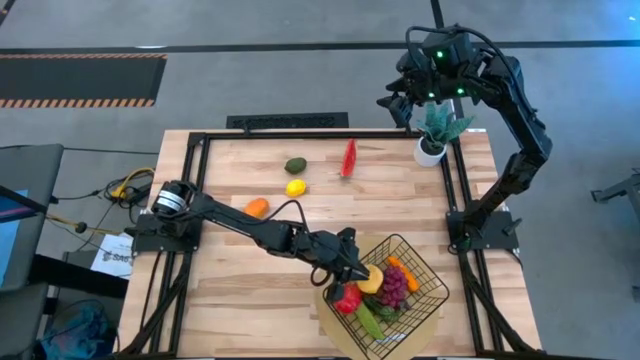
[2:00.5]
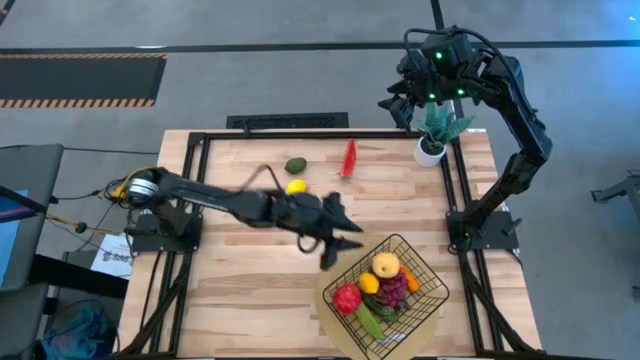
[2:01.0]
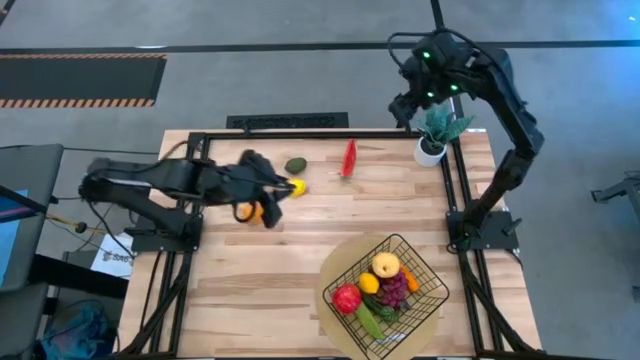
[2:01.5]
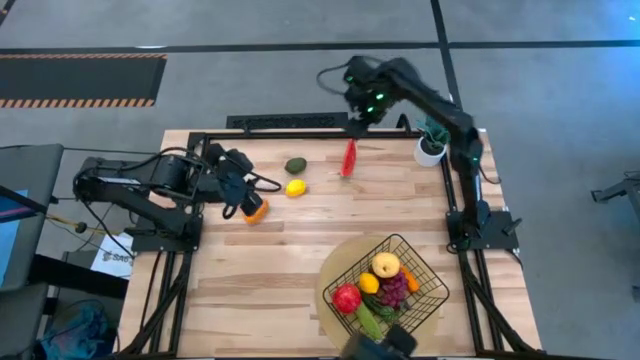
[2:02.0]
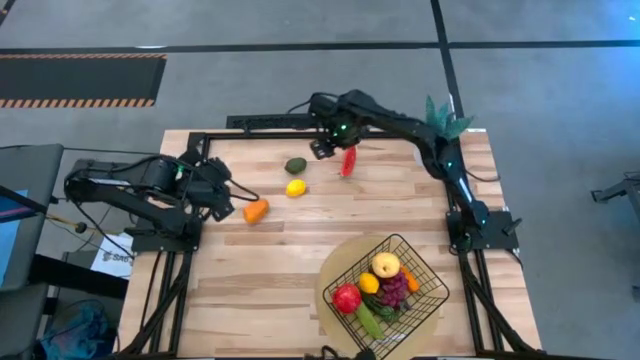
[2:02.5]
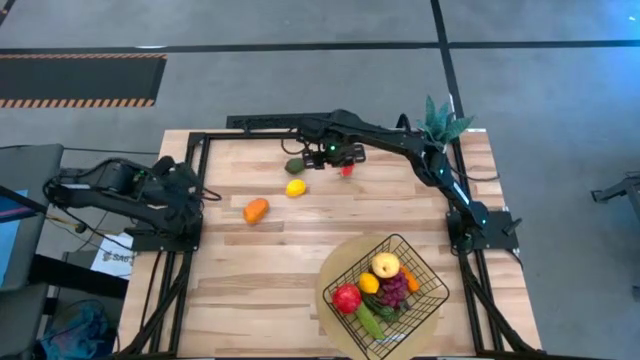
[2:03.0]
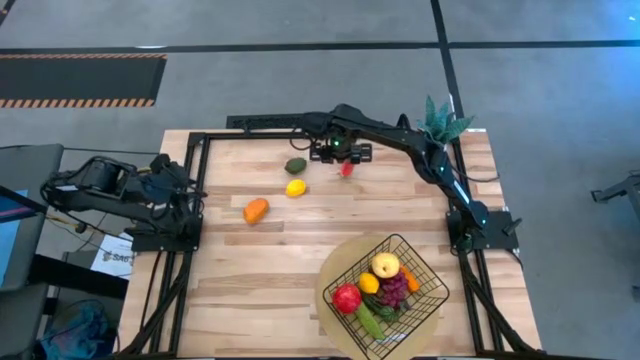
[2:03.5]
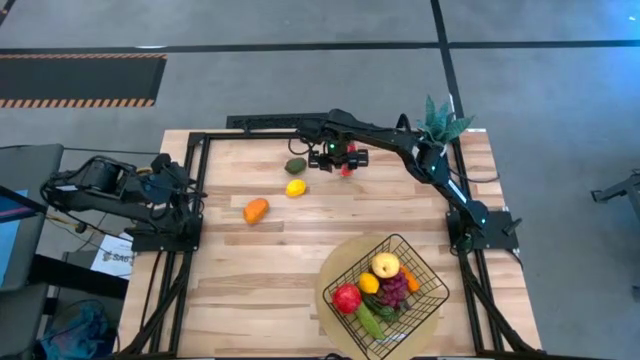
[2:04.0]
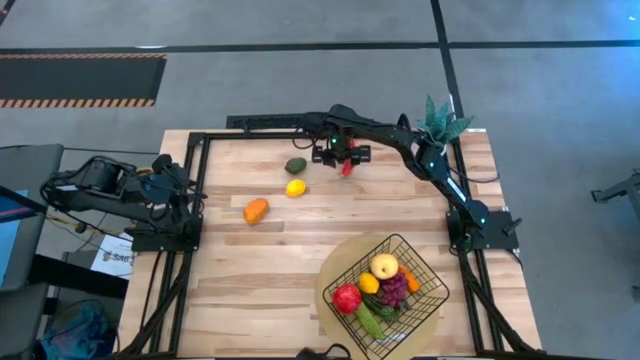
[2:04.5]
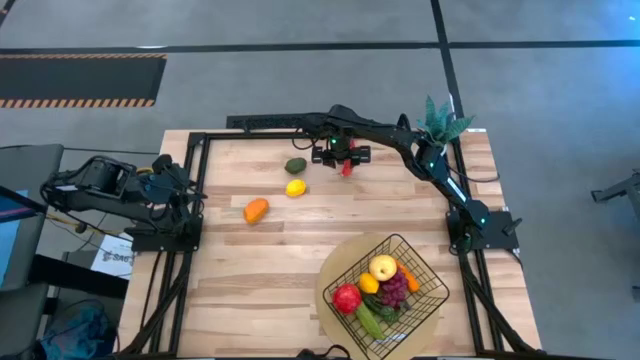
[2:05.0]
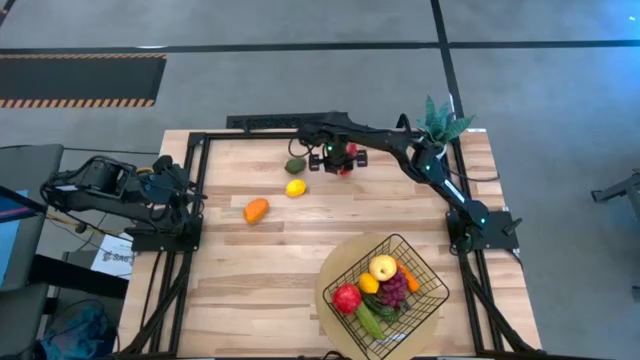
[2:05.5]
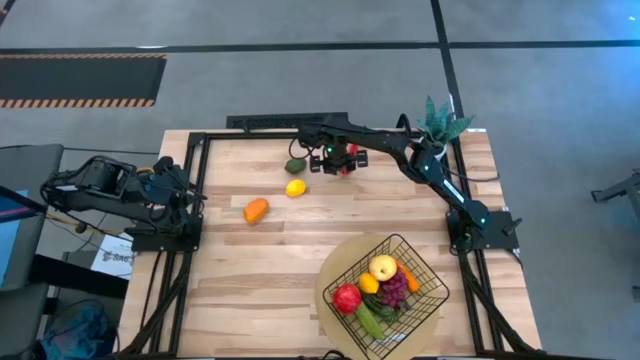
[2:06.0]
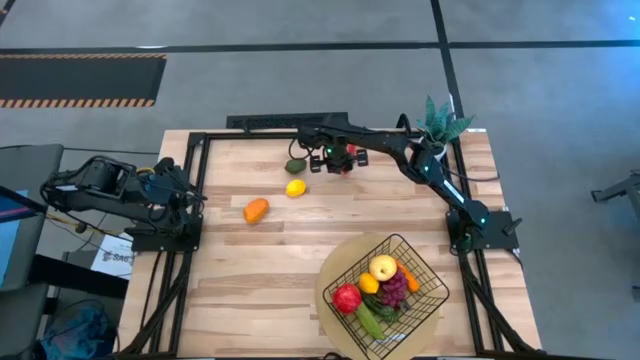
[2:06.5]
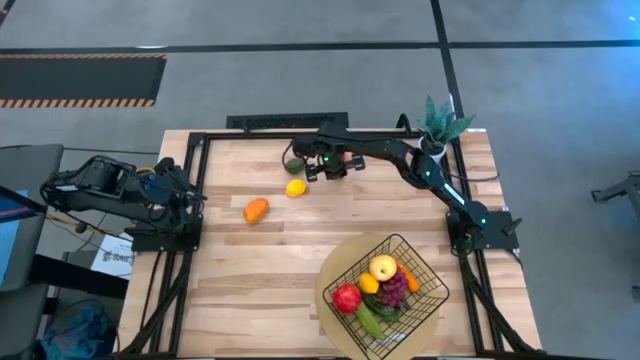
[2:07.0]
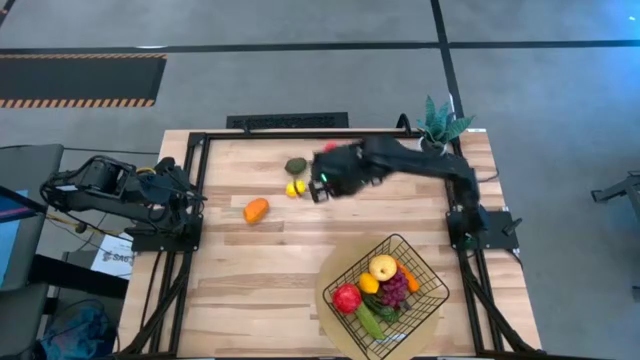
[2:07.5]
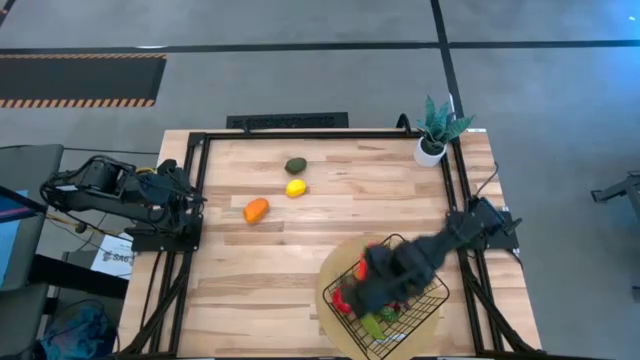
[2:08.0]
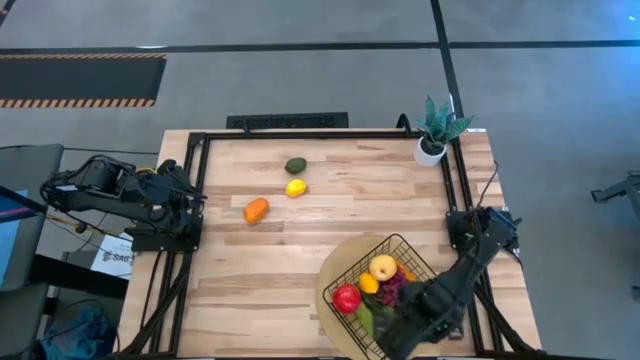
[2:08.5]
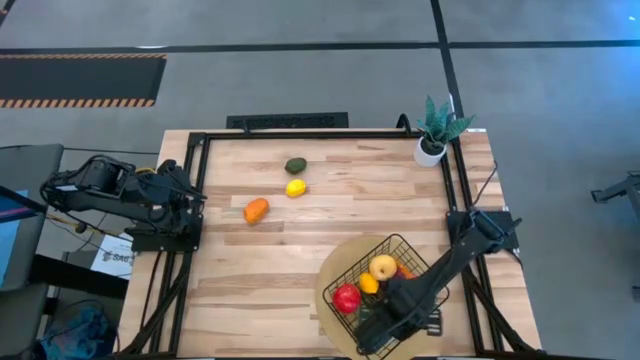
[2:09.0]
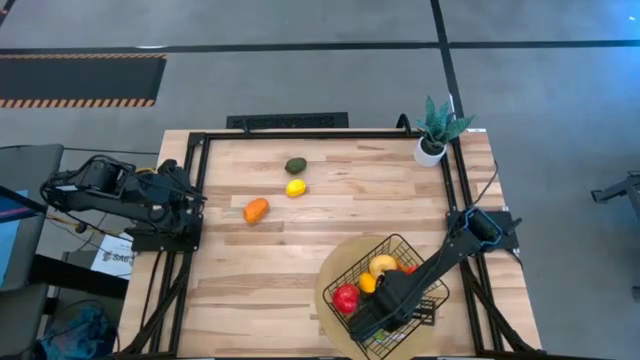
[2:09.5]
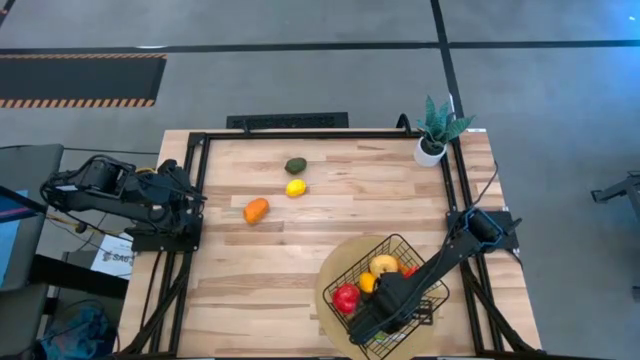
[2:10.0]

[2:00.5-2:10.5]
Task: Build produce basket
Put the watermelon into the mesh basket

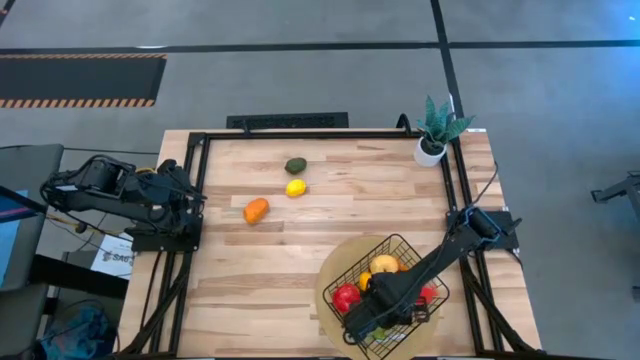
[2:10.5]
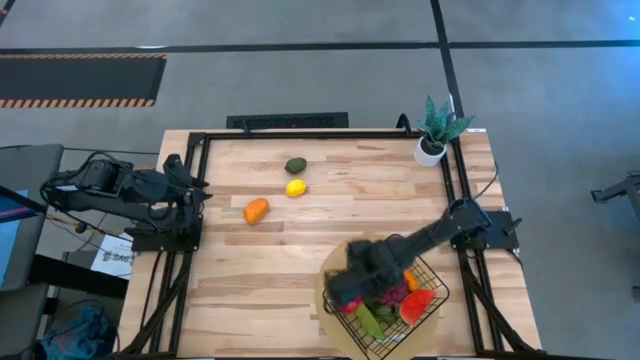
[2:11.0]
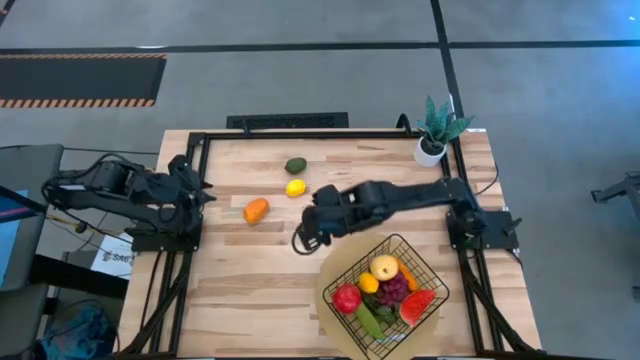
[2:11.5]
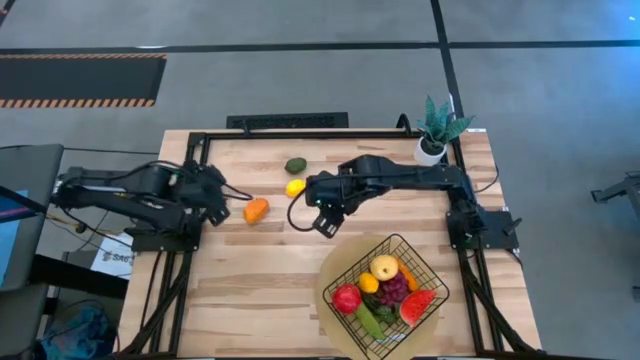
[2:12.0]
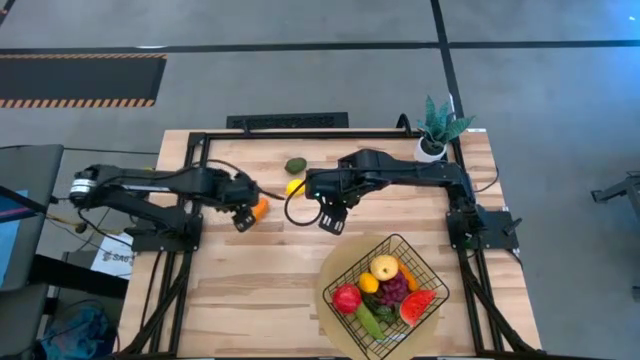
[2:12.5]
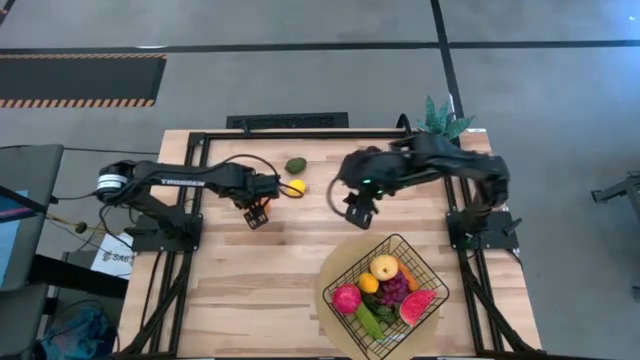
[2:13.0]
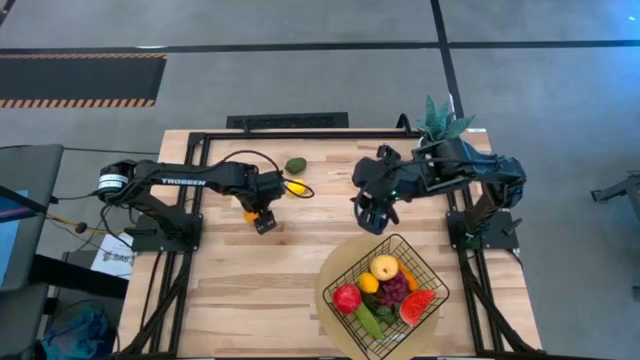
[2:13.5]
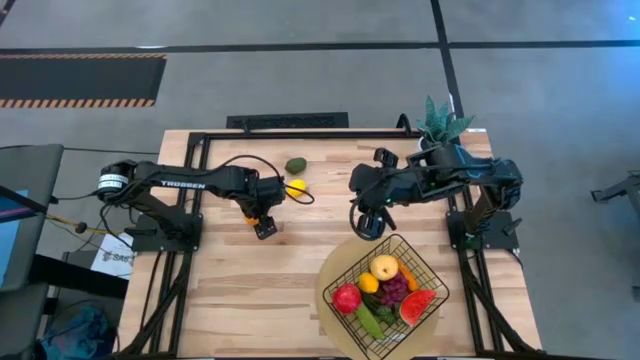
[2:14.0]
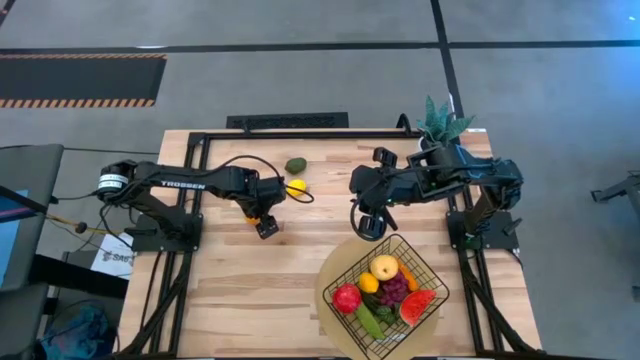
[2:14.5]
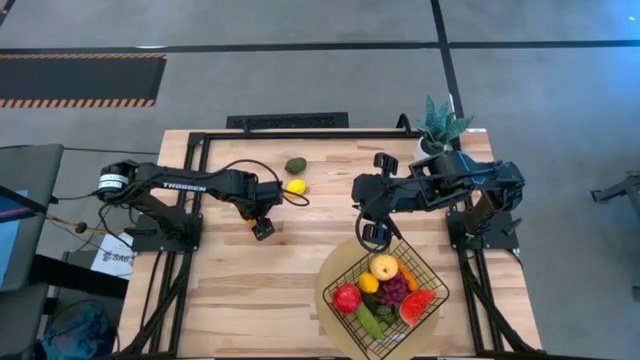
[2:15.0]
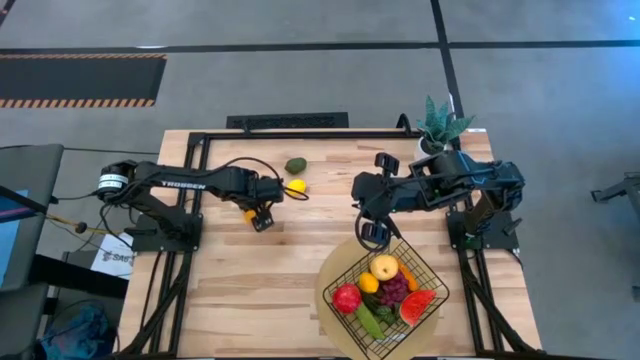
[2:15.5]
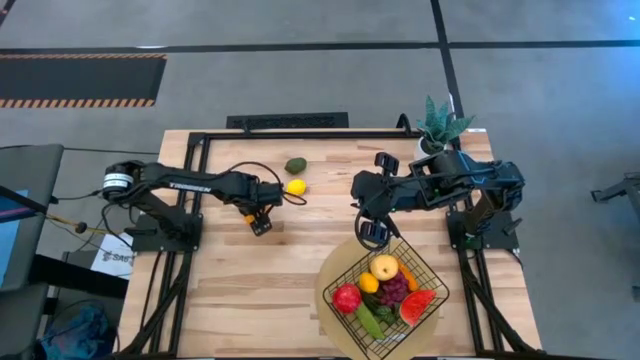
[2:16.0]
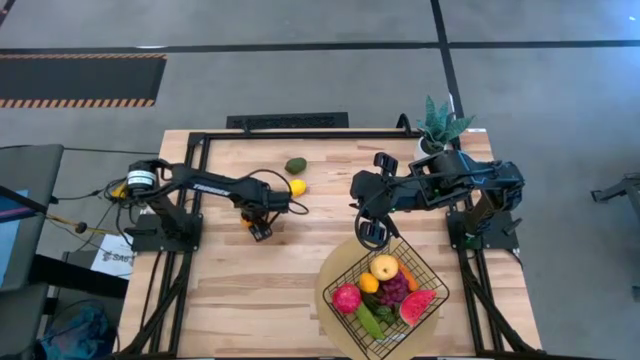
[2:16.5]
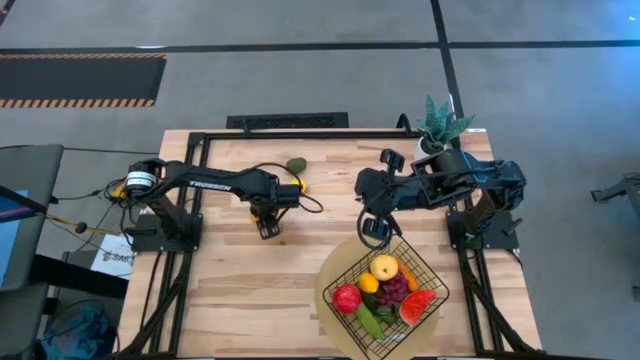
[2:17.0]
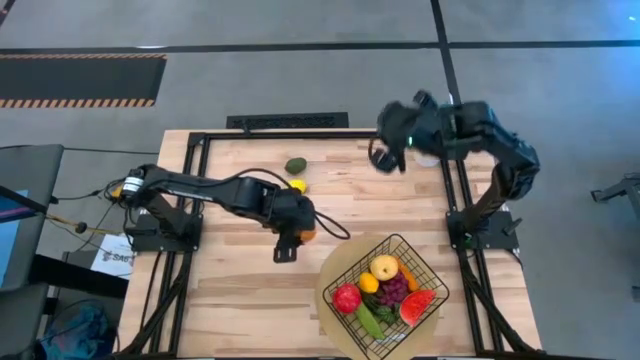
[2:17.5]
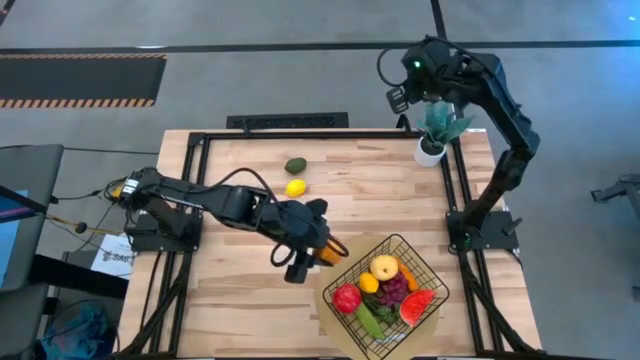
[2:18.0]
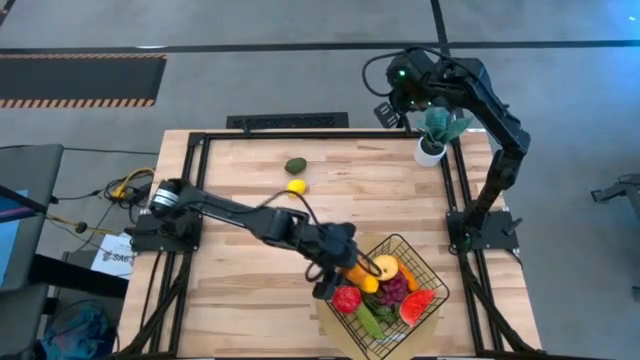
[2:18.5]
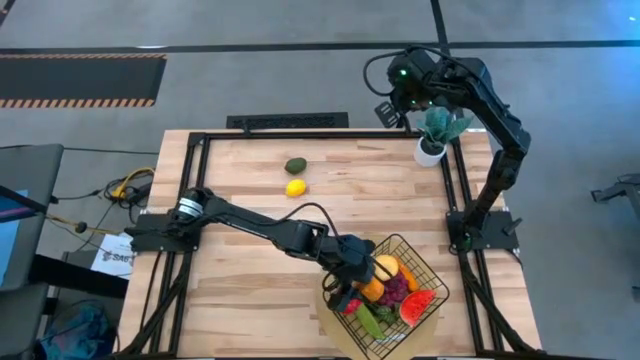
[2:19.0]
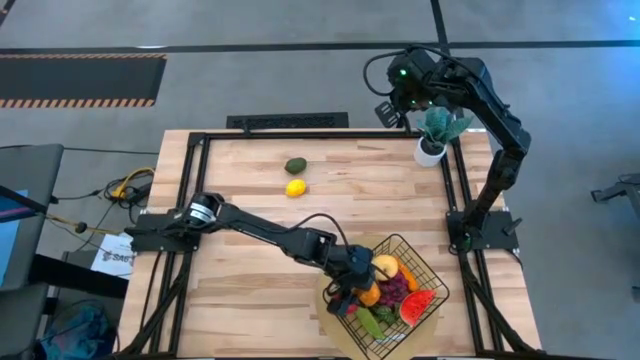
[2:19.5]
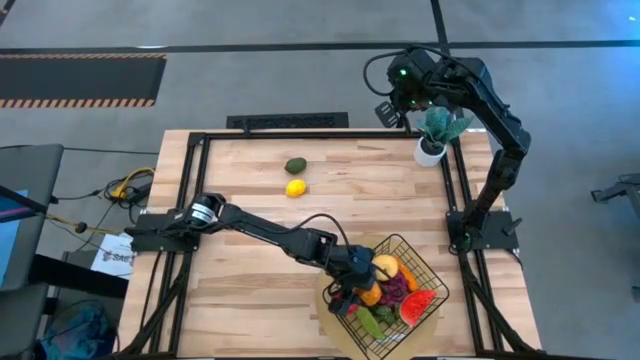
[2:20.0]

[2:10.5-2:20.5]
Put the mango into the mesh basket
